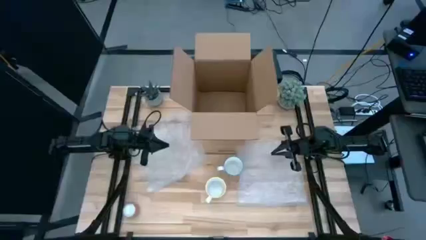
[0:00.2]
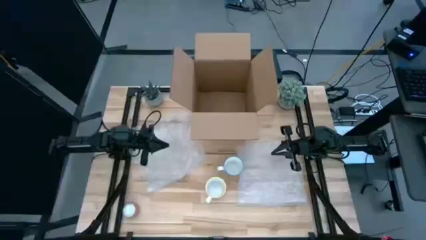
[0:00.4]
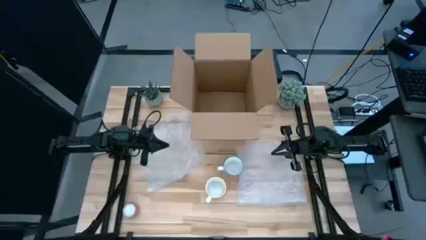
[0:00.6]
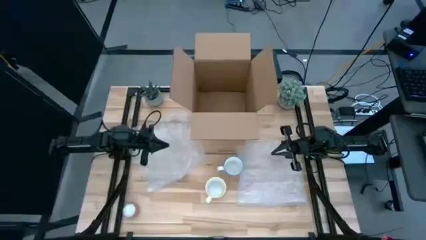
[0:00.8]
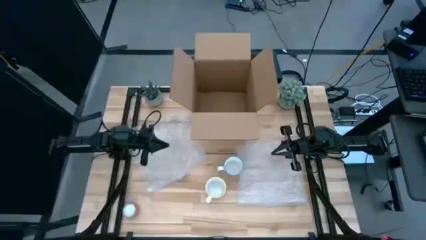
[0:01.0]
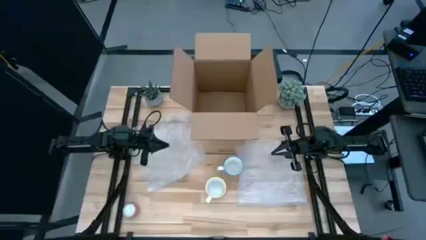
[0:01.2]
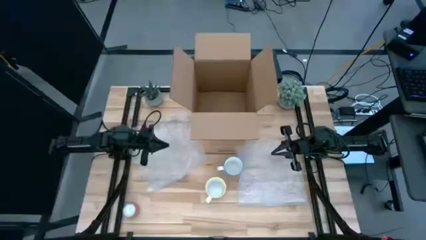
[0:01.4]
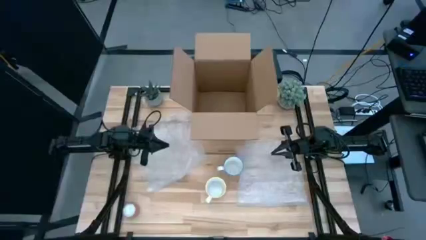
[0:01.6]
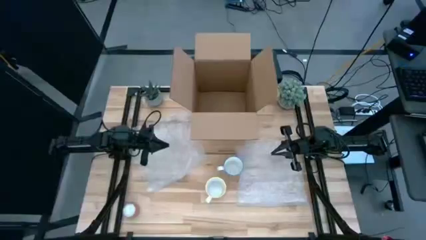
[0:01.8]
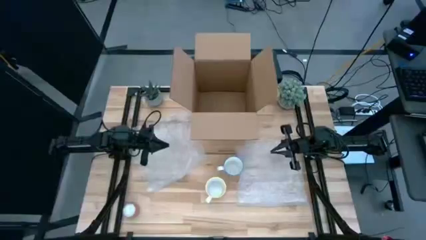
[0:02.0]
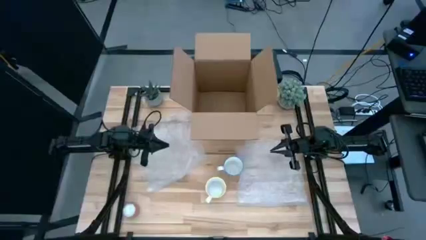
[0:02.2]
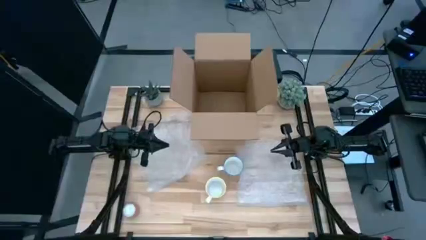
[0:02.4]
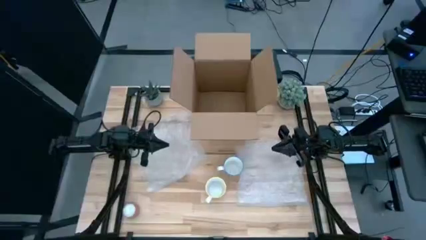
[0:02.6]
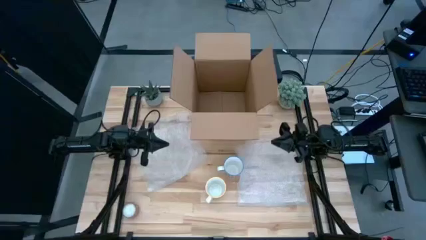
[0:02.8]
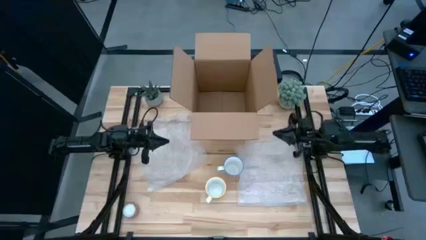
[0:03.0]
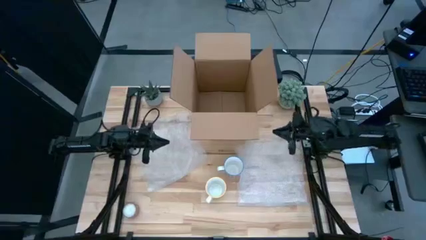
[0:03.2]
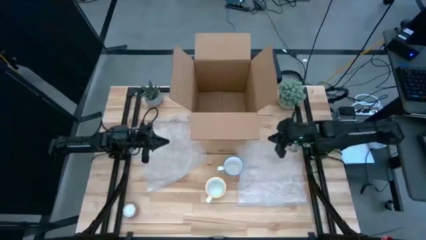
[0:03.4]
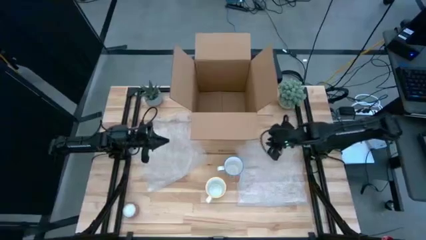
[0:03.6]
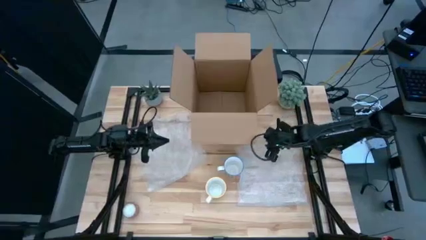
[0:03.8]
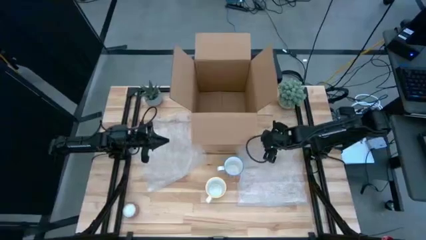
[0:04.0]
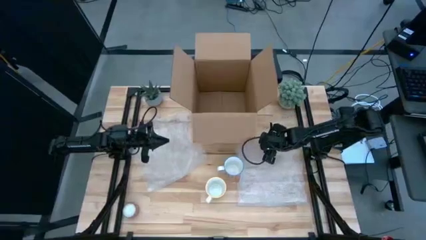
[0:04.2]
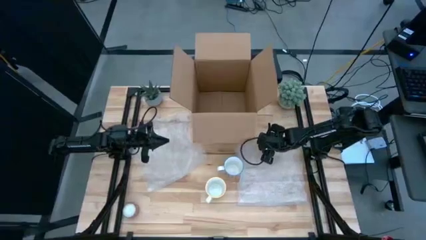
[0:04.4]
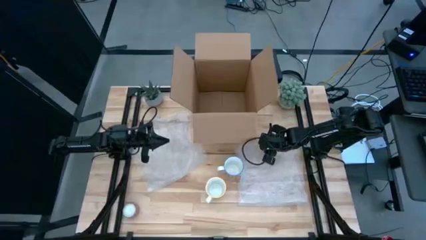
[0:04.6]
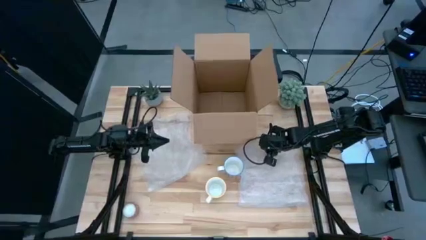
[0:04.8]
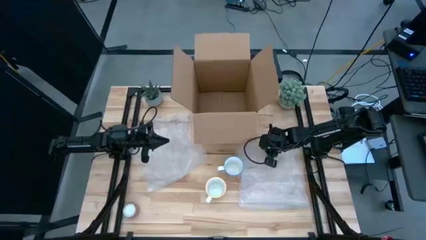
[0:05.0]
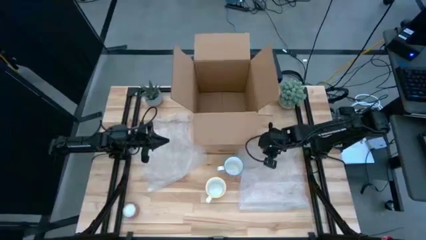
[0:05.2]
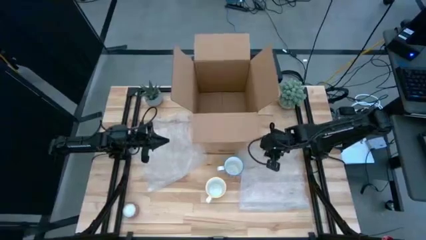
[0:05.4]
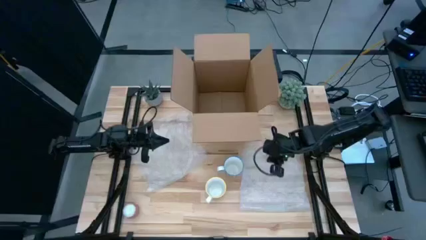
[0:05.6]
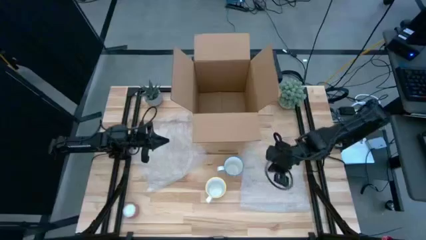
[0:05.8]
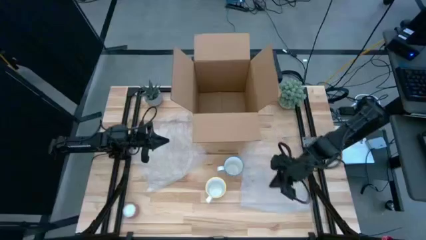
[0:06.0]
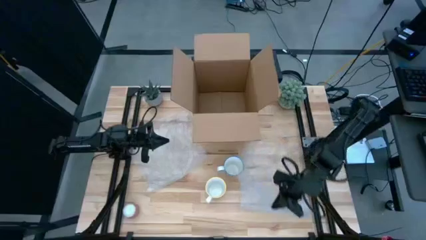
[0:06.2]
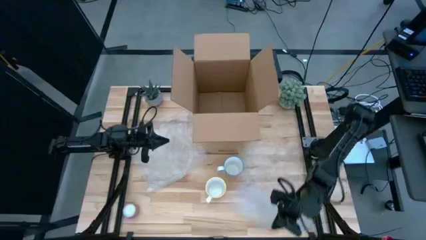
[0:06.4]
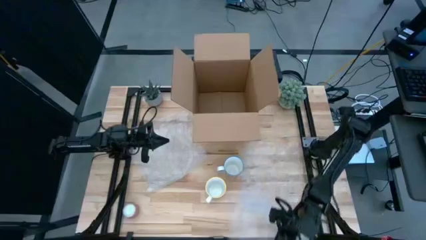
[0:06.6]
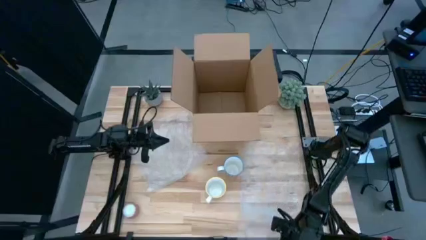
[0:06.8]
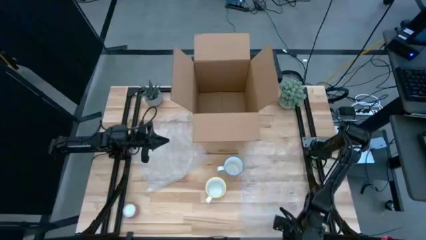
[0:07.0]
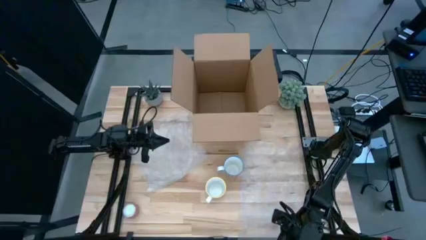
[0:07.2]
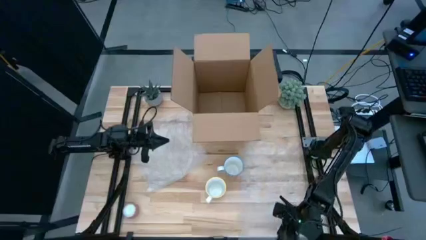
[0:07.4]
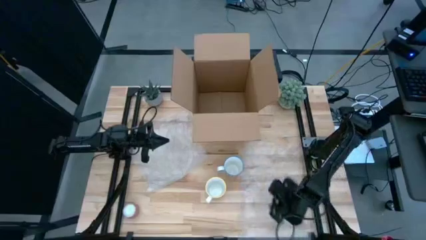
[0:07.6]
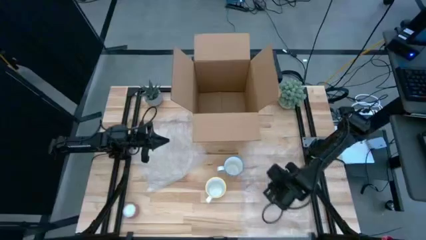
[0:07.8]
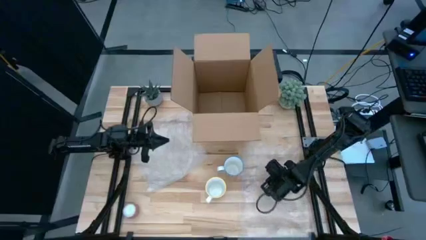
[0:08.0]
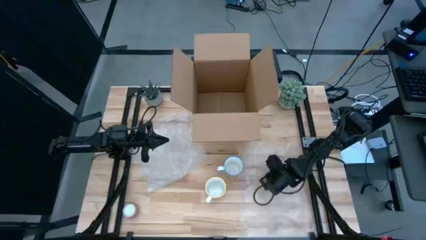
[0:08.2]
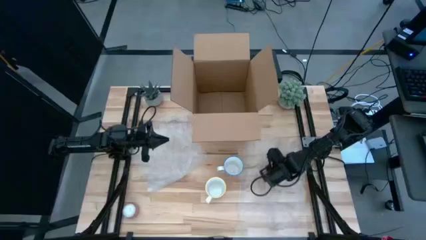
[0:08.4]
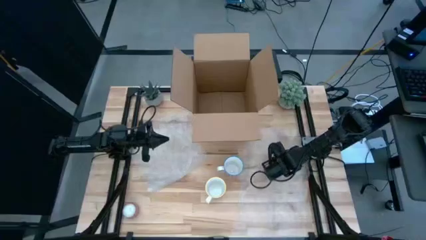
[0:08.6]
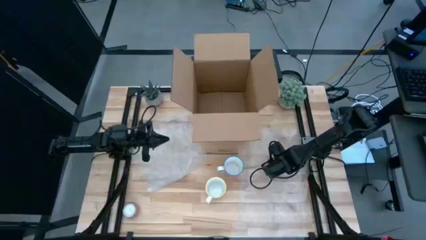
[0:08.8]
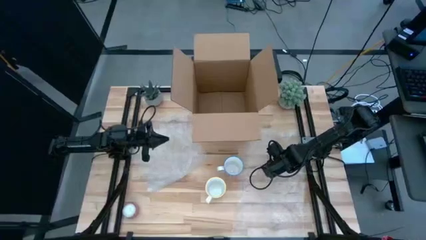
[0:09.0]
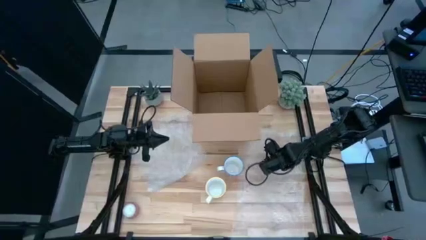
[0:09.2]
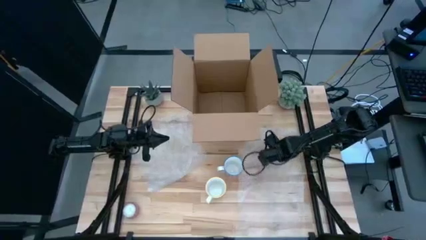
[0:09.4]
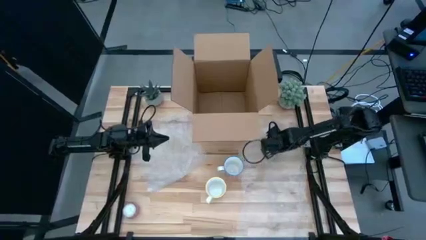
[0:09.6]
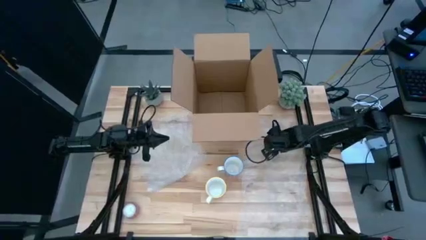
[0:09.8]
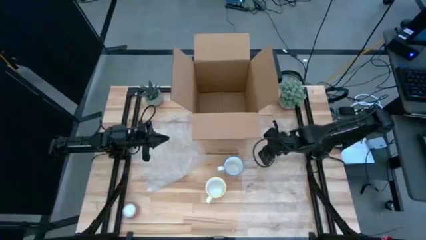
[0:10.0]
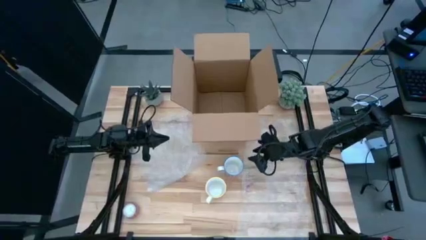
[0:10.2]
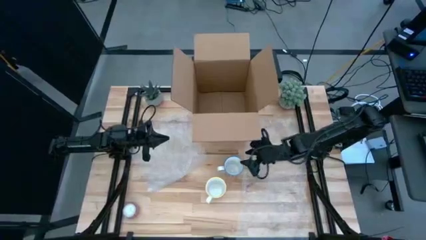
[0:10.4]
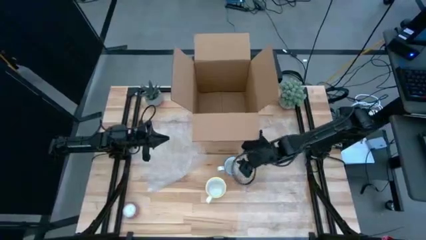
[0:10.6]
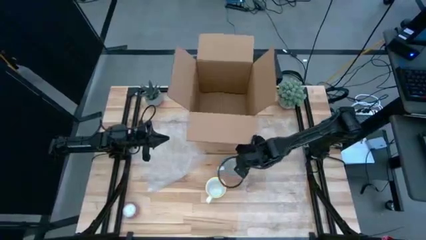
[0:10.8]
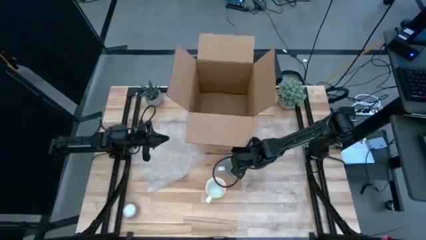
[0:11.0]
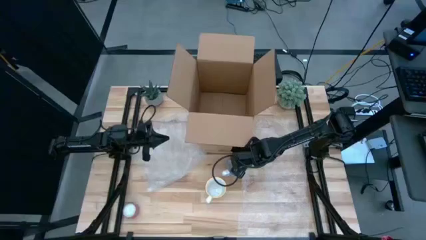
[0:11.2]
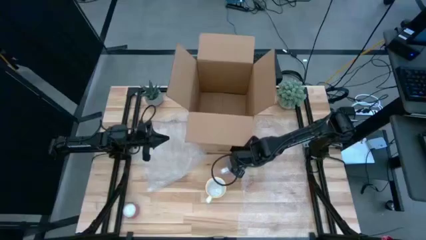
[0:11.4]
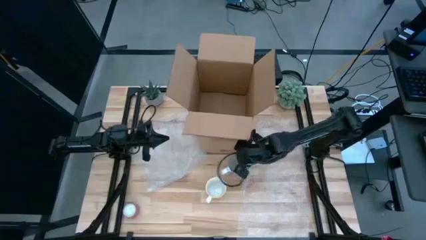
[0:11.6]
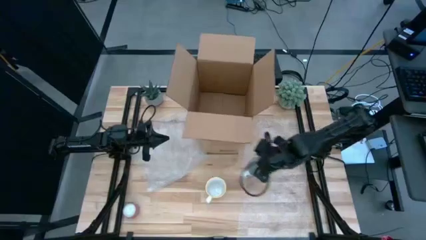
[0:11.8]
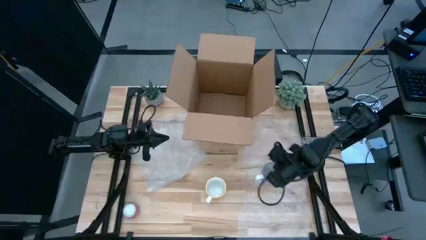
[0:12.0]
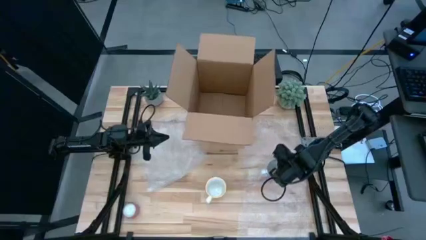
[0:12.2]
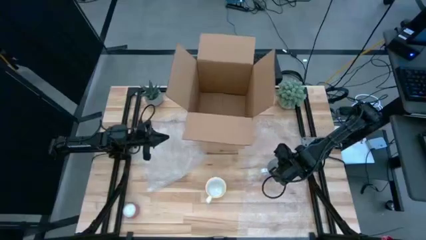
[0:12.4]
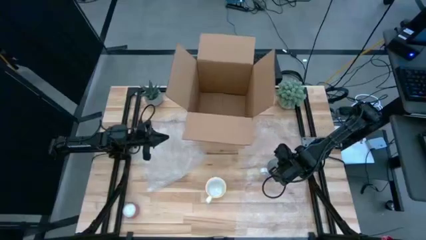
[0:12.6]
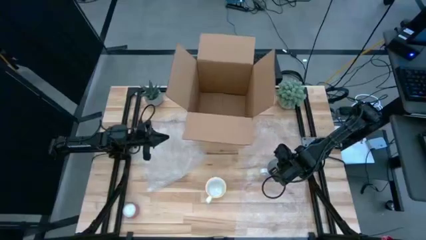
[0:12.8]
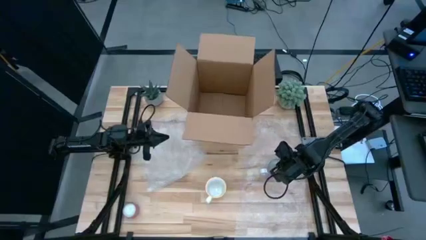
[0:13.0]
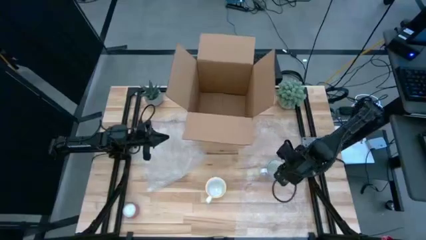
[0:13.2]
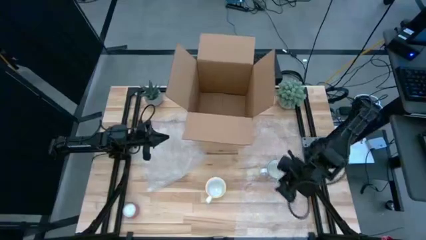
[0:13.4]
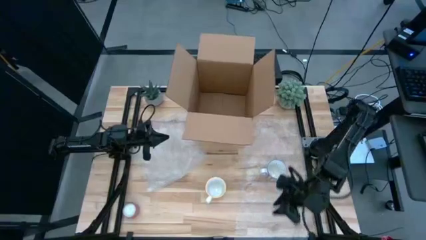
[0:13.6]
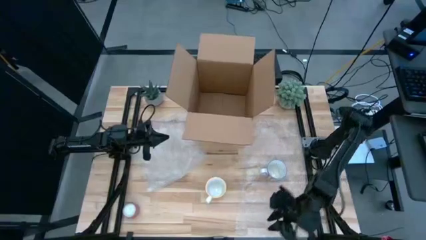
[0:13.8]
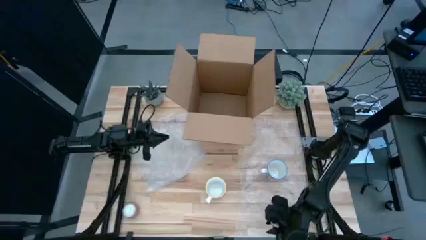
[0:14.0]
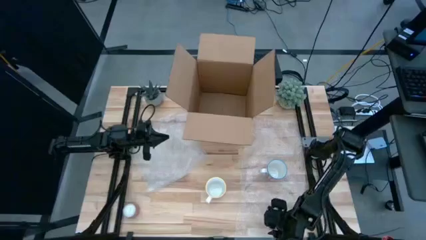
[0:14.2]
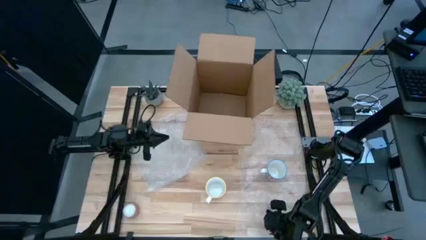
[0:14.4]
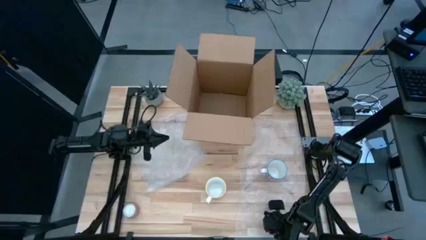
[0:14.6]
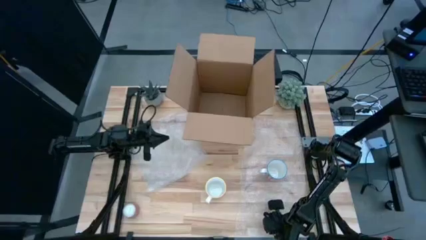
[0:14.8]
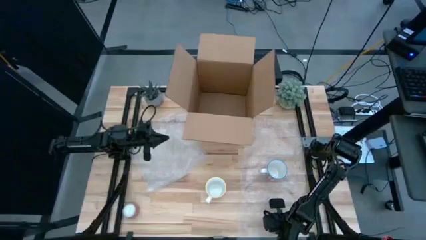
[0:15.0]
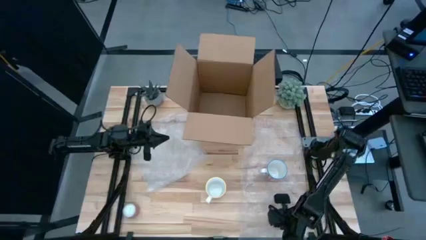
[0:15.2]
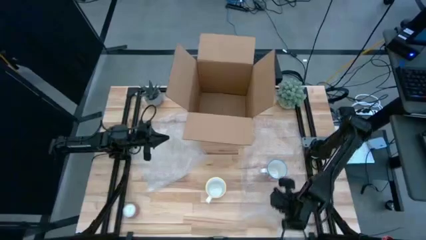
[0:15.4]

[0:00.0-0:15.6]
Task: wrap mug
Wrap the red cup with the bubble wrap
